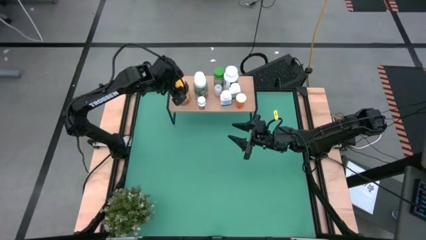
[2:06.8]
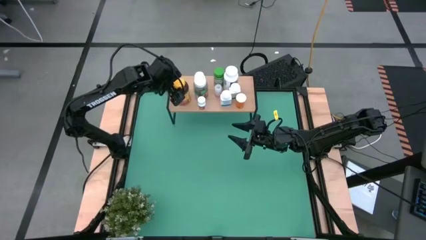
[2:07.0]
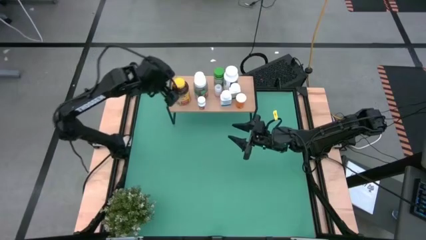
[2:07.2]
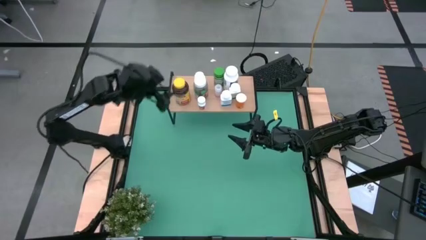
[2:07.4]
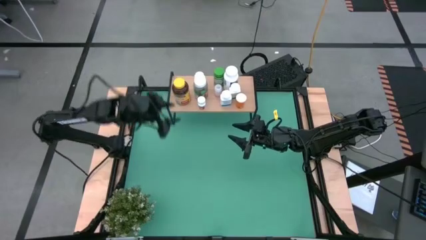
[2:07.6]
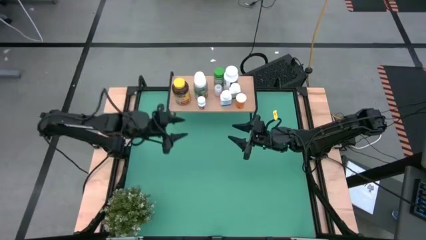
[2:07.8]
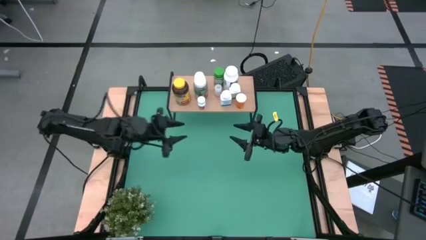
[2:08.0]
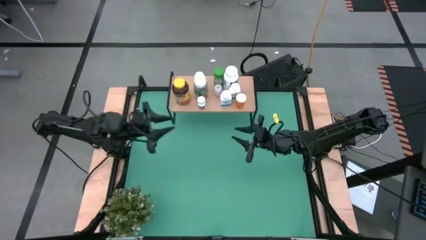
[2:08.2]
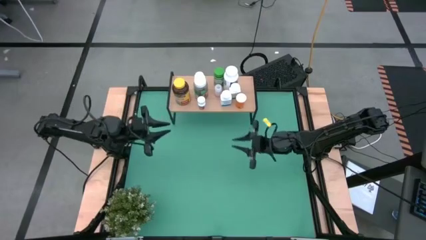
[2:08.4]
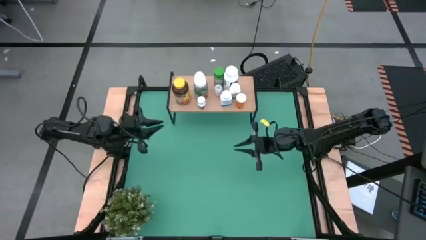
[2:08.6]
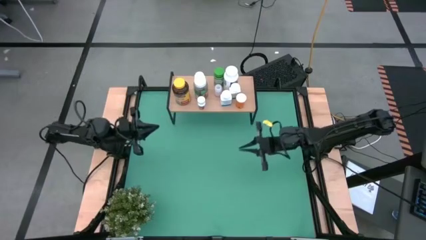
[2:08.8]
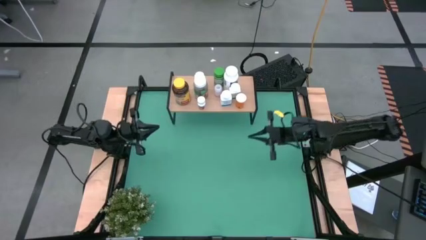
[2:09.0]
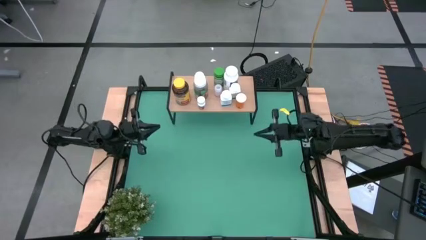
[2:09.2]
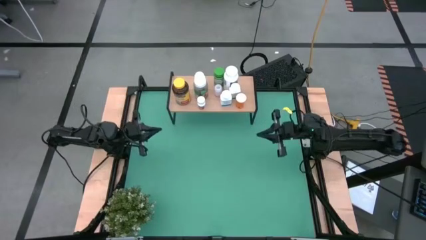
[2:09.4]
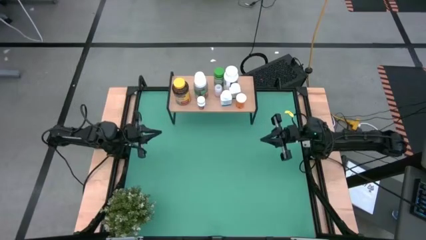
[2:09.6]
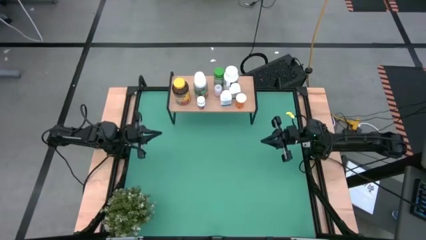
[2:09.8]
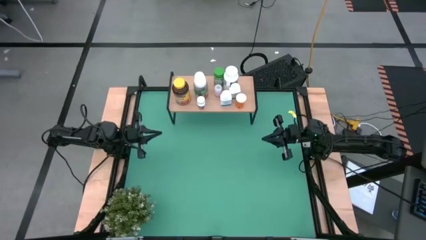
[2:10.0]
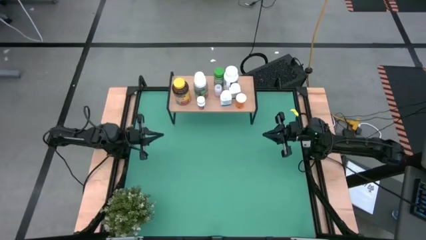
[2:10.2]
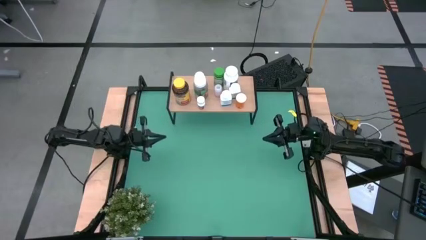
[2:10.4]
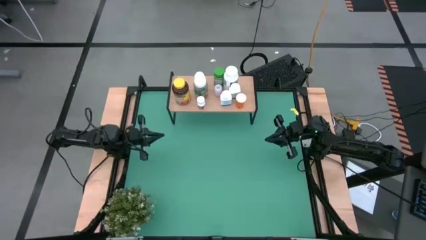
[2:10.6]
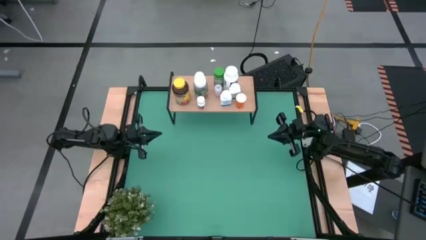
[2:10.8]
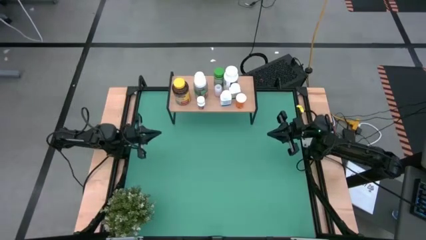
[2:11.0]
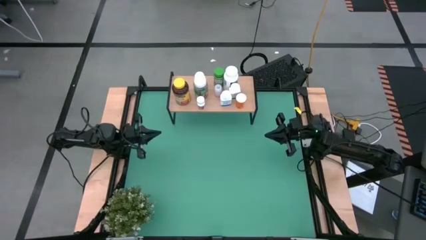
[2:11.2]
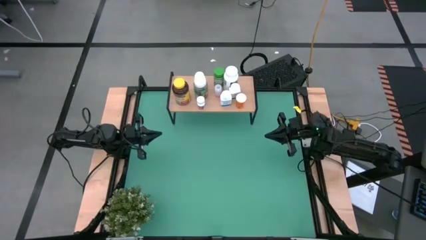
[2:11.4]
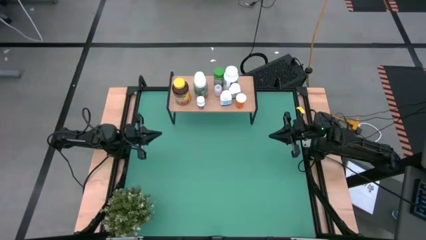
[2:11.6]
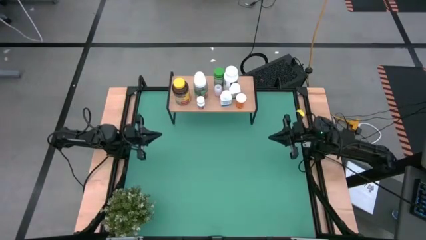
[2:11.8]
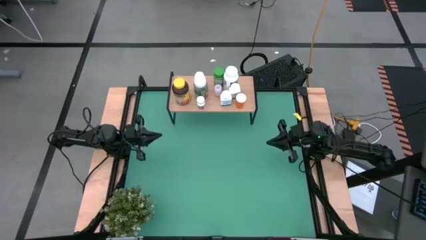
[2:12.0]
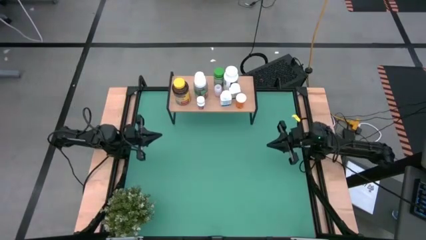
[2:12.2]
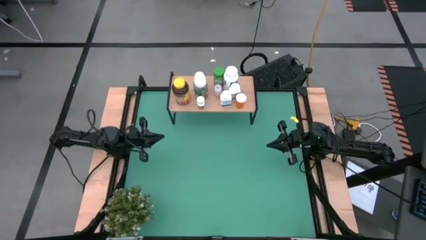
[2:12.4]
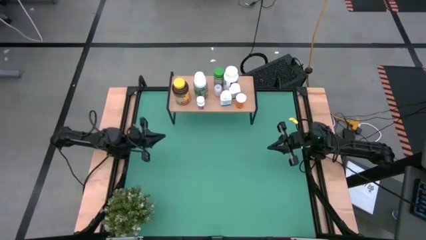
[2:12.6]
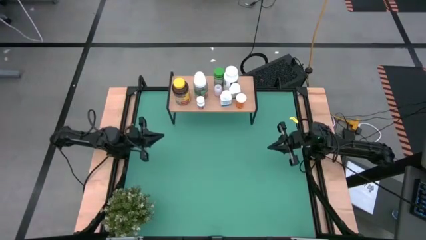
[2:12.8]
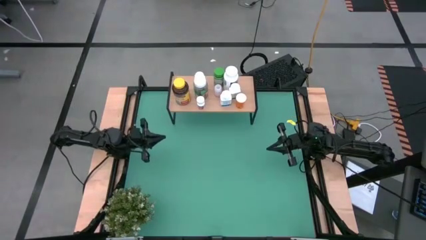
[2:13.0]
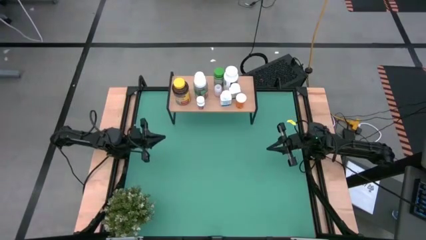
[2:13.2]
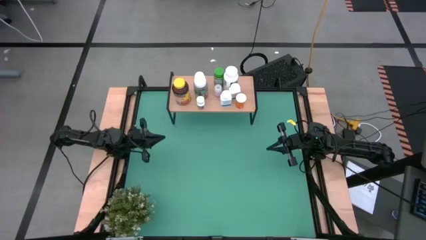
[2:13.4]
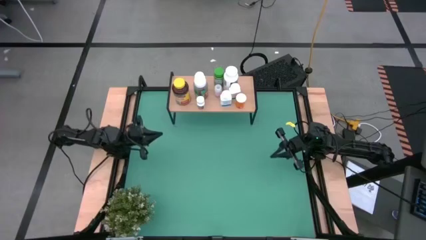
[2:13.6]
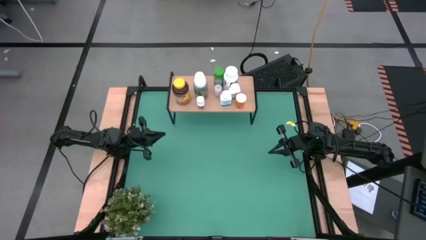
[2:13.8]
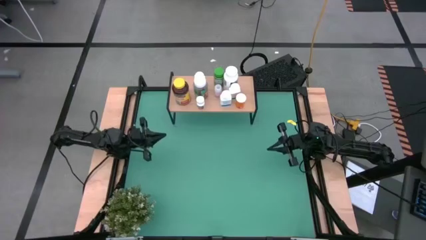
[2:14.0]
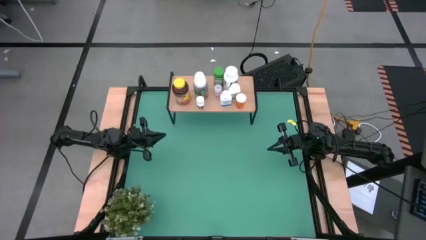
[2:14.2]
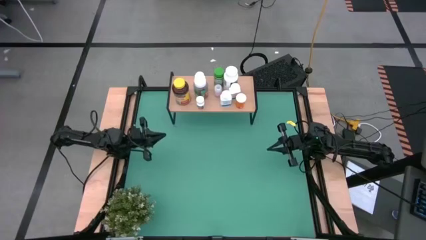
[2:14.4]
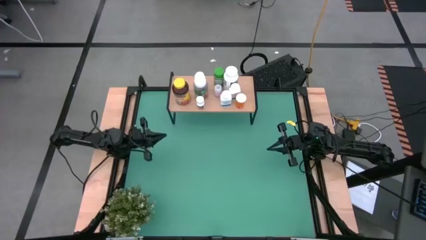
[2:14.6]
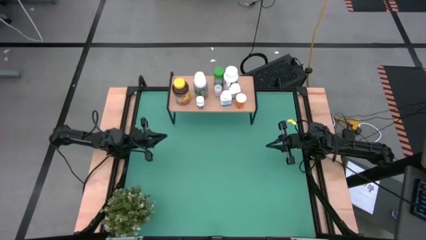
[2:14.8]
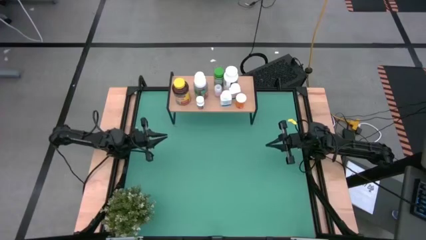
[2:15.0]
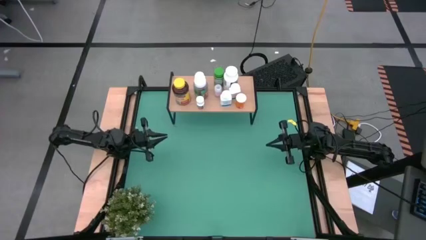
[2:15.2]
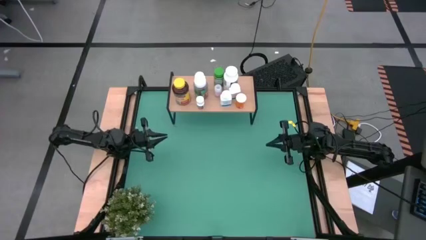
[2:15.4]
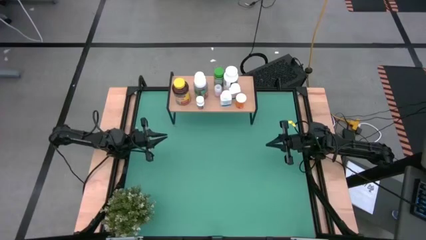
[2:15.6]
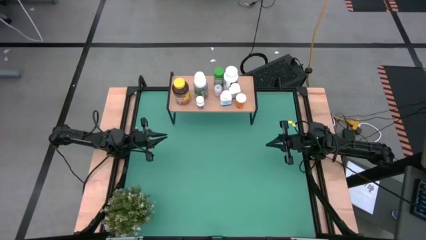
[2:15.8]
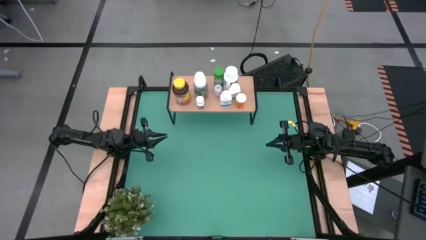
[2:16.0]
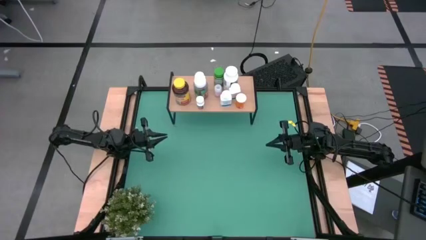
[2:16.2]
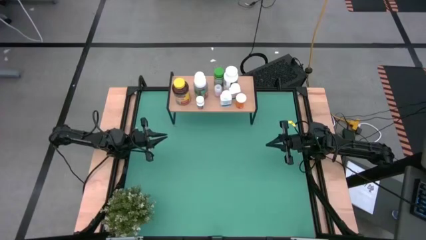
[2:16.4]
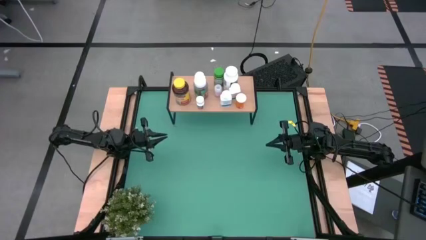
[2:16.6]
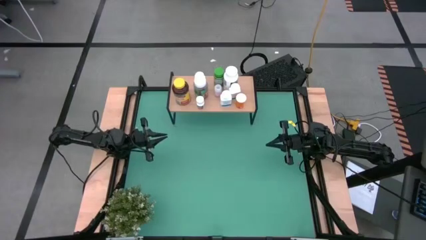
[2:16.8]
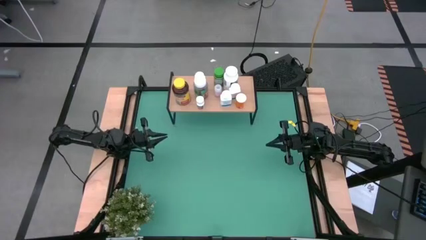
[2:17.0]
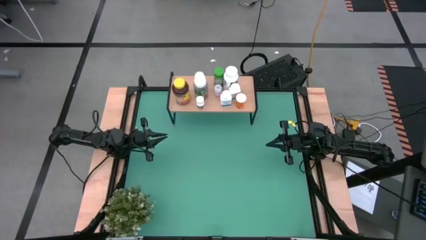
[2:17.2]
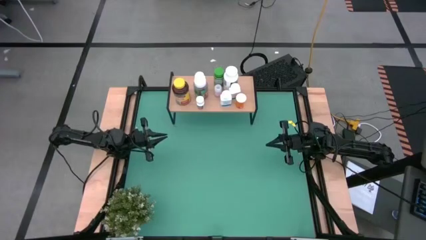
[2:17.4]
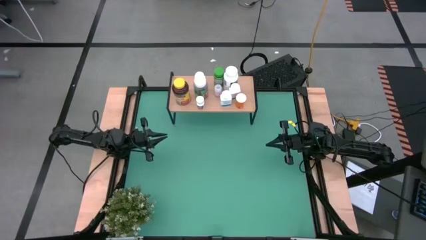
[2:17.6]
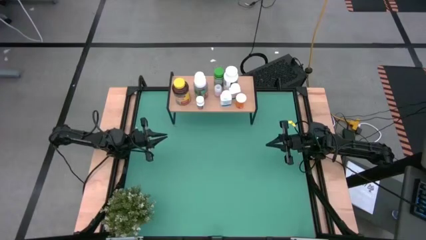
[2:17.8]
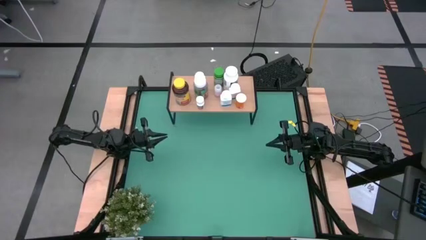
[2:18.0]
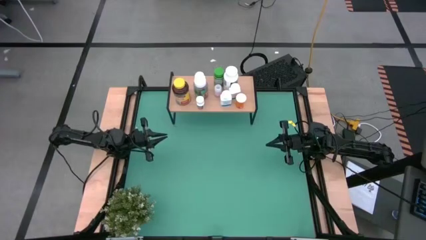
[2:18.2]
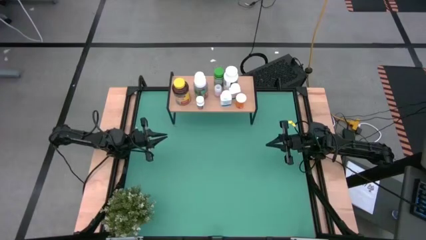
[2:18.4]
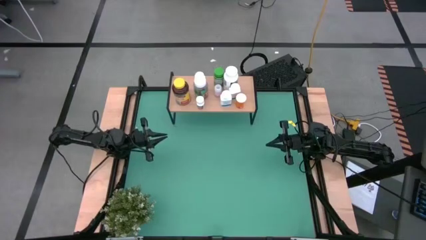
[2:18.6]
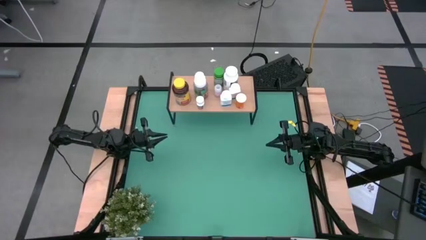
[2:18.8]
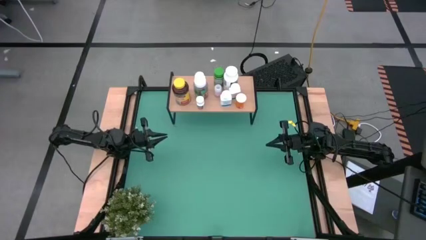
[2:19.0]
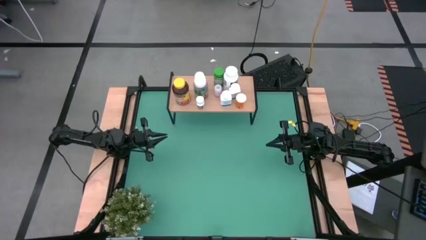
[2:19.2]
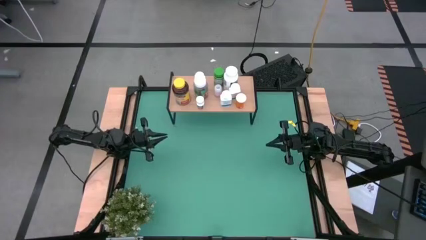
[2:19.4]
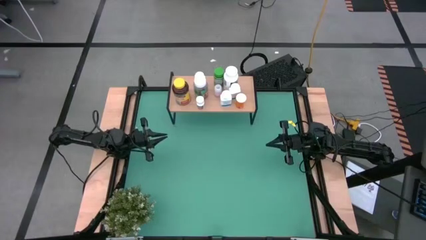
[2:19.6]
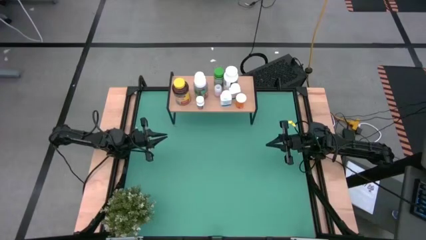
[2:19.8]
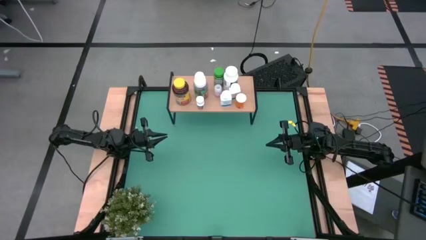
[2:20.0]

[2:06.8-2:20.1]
Task: Pick and place medicine bottles onto shelf by color
Return to Home Position

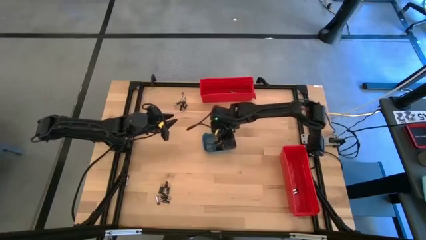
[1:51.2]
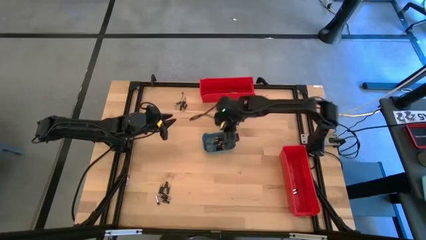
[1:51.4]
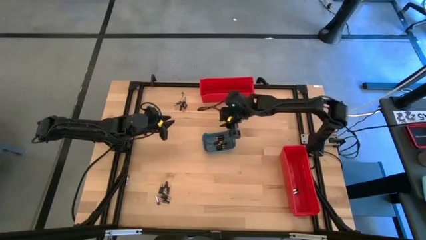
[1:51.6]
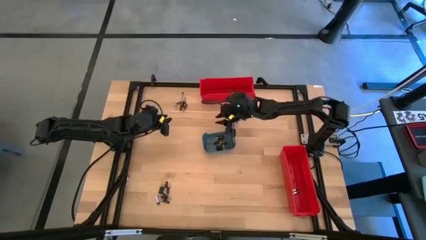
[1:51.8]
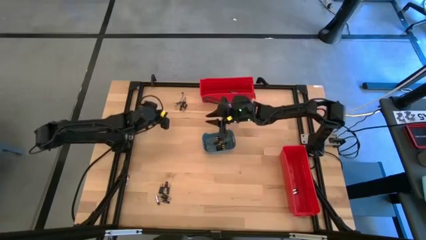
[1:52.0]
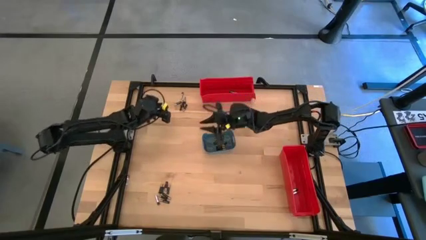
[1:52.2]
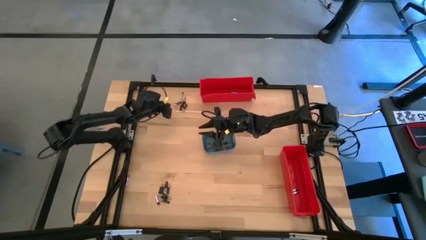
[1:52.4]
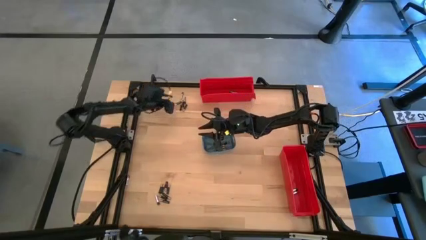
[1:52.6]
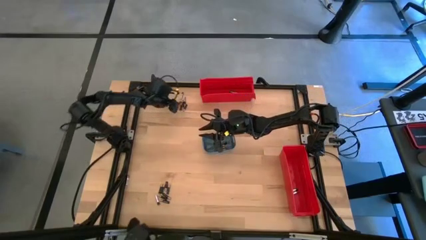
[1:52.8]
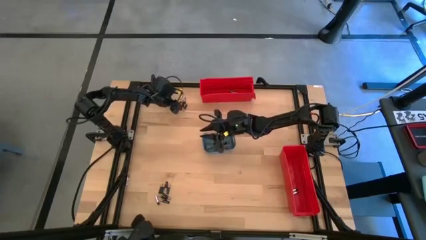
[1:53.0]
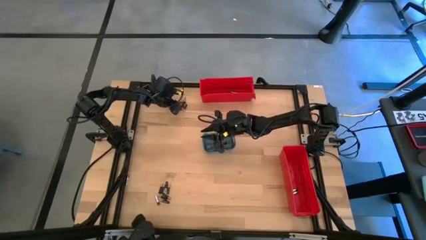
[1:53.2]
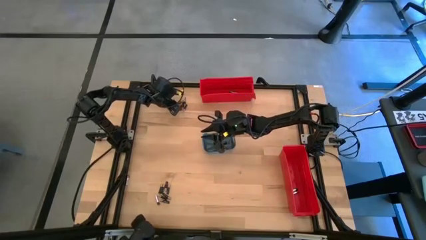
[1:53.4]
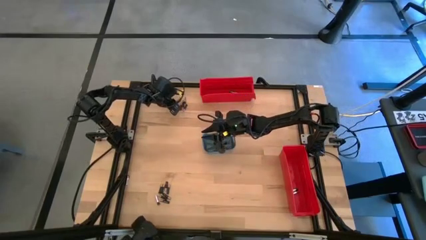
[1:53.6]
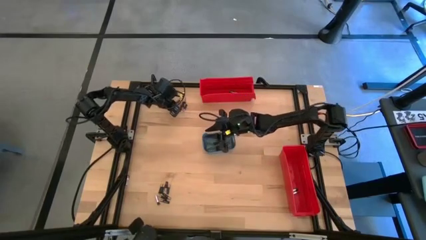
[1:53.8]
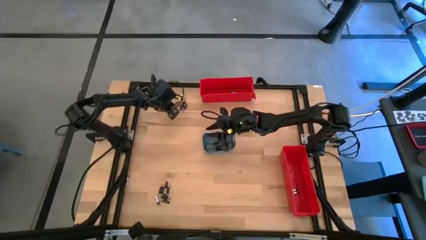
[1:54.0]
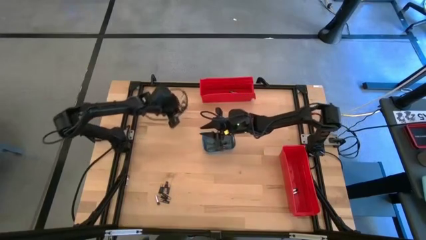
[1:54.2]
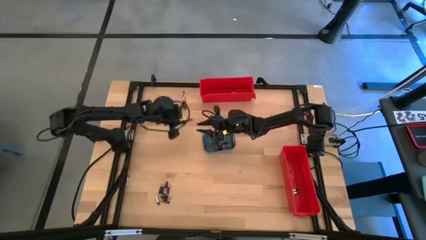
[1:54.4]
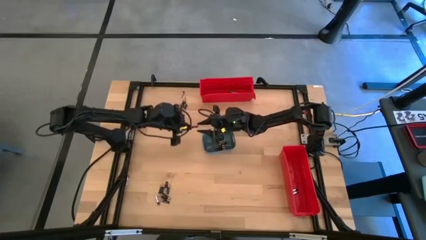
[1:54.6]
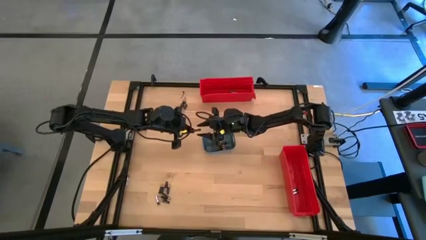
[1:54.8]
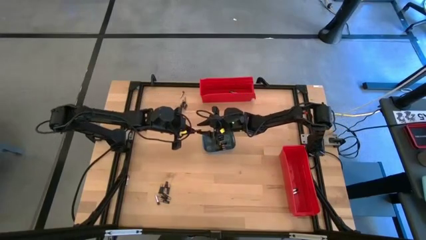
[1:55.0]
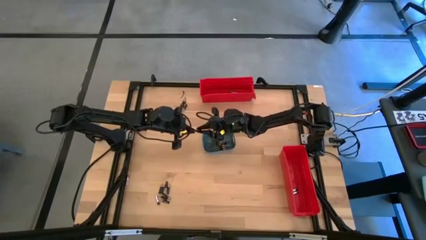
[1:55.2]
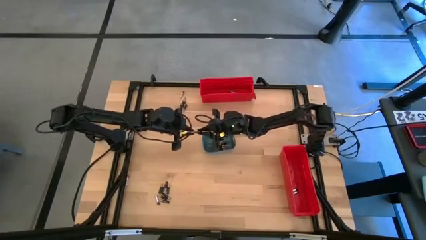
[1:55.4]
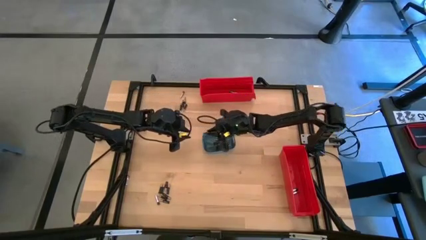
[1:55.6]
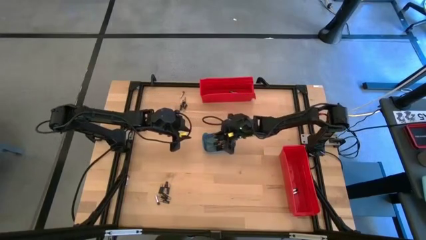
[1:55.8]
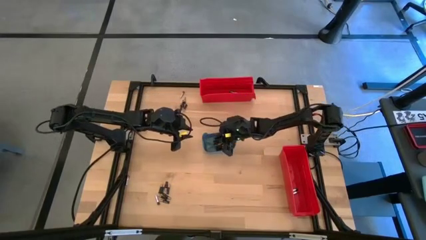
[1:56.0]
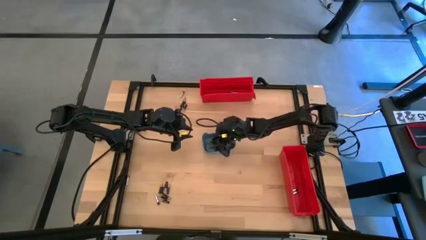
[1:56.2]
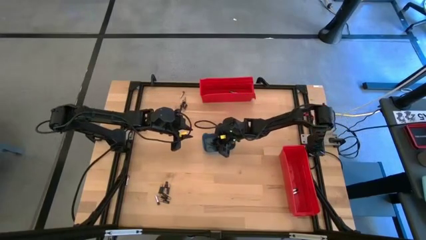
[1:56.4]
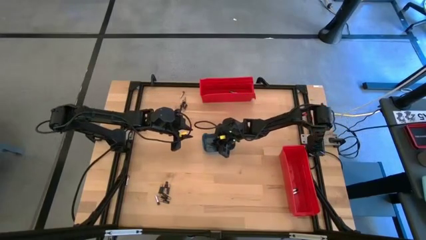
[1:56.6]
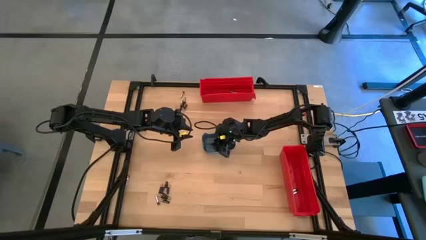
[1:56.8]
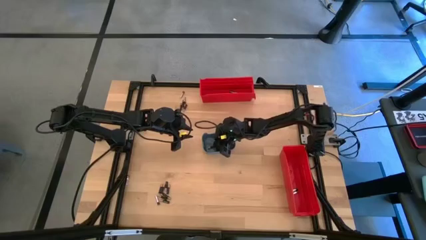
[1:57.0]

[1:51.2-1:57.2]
Task: Sort batteries
Put the black battery into the blue bin
